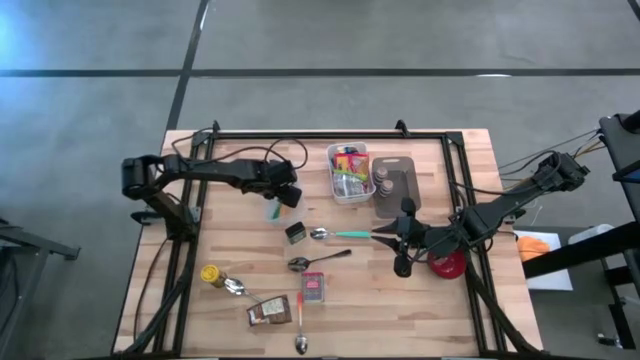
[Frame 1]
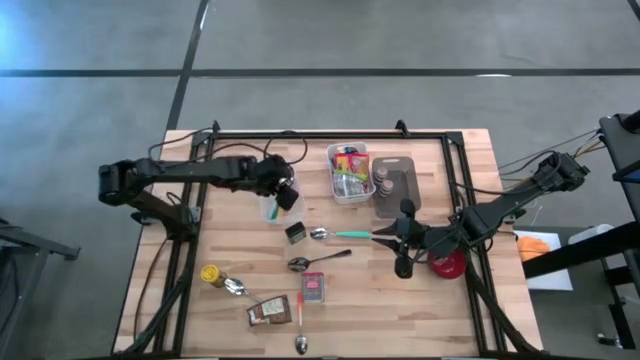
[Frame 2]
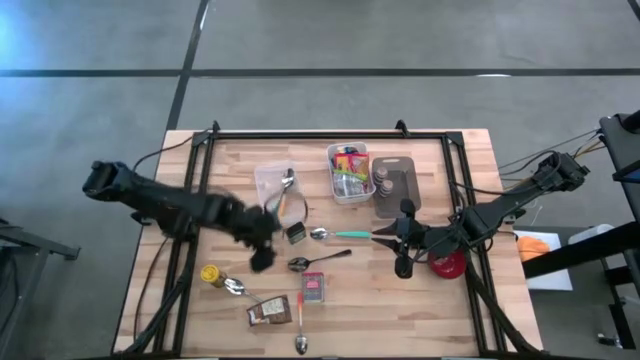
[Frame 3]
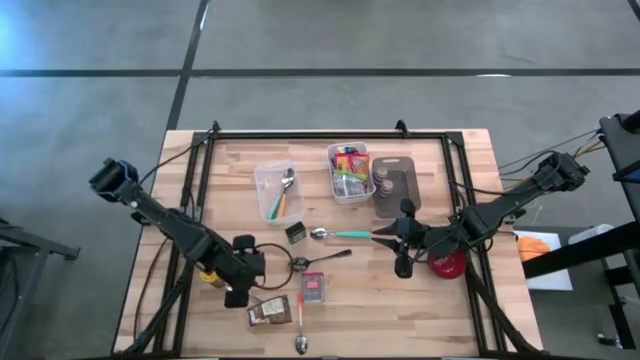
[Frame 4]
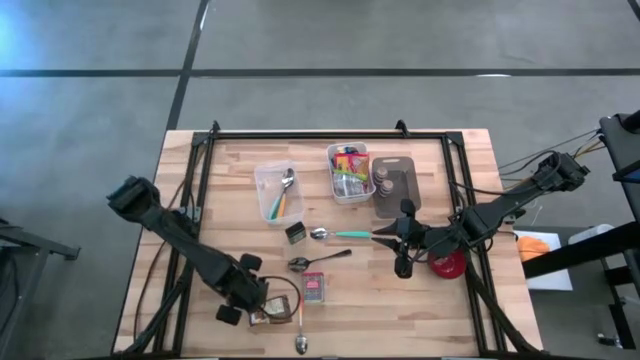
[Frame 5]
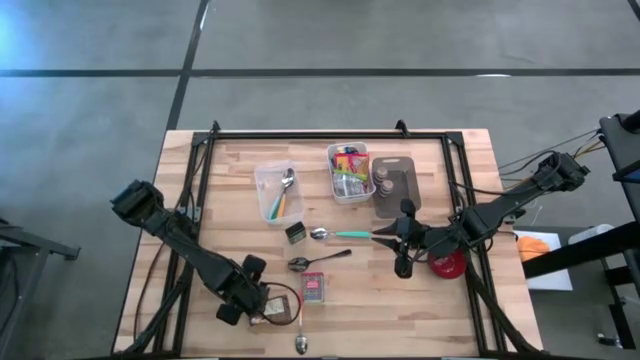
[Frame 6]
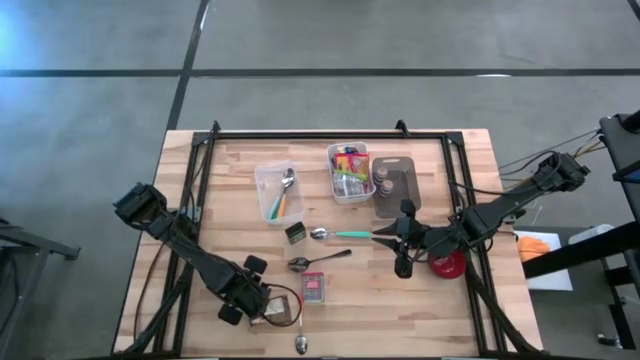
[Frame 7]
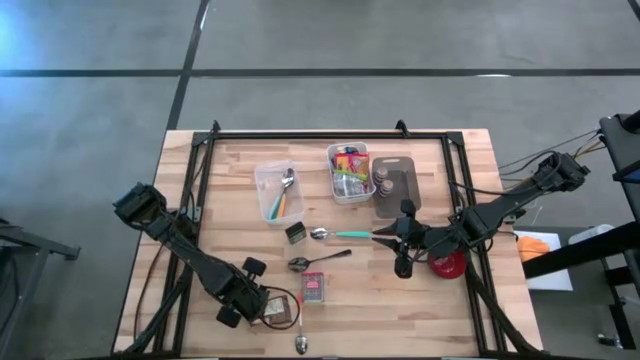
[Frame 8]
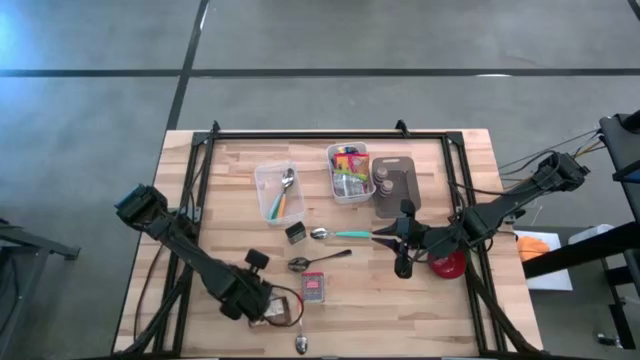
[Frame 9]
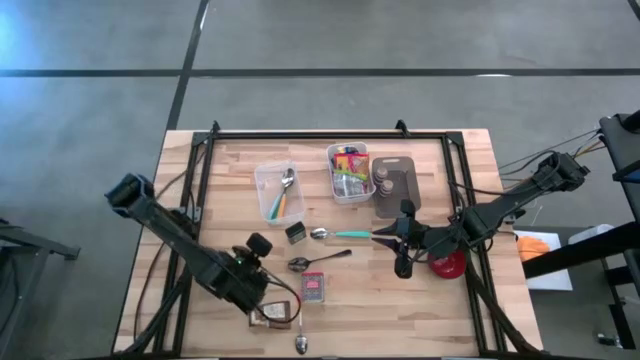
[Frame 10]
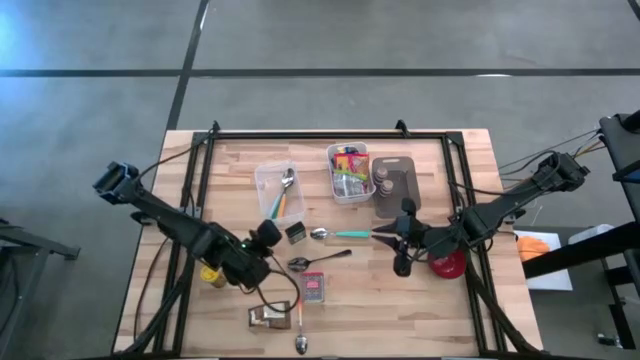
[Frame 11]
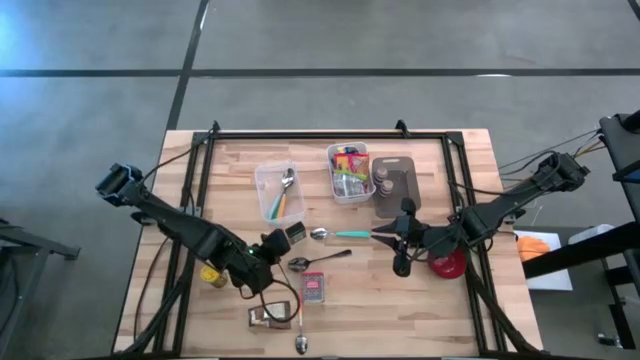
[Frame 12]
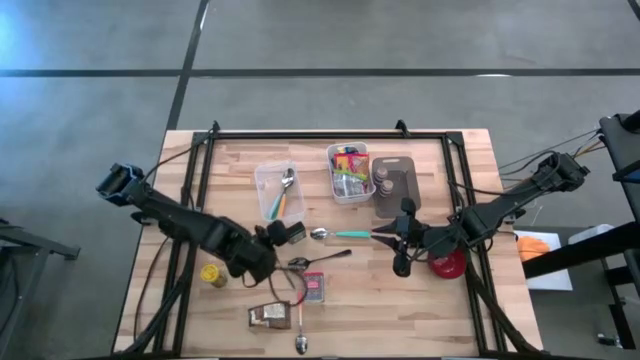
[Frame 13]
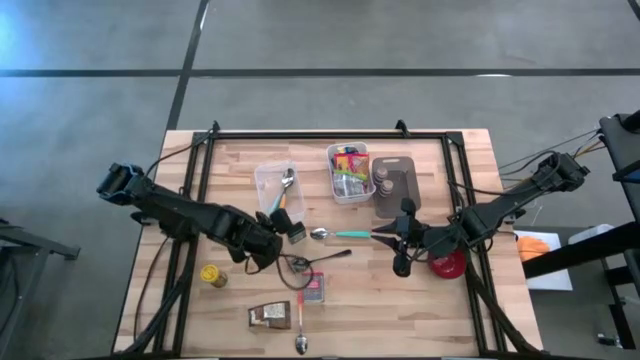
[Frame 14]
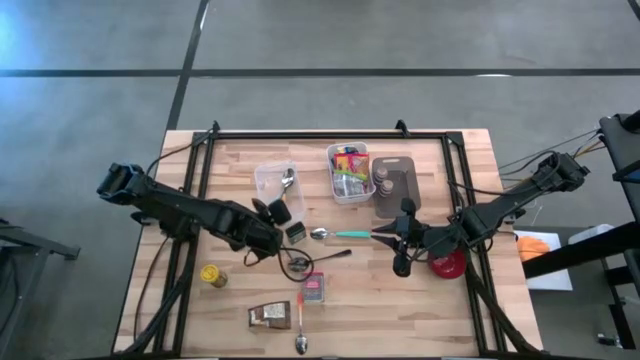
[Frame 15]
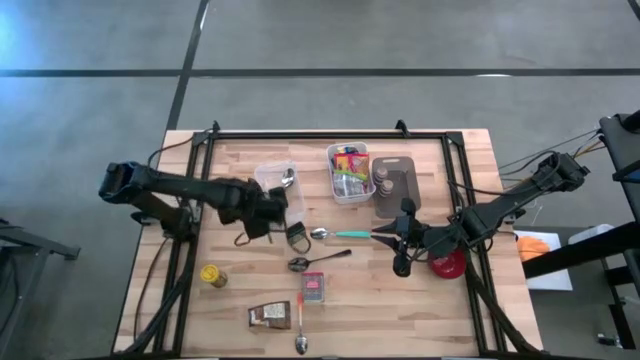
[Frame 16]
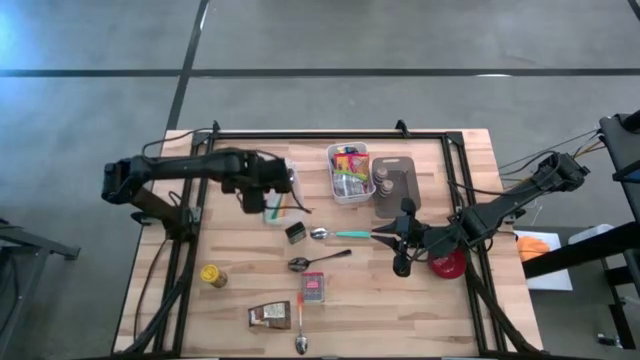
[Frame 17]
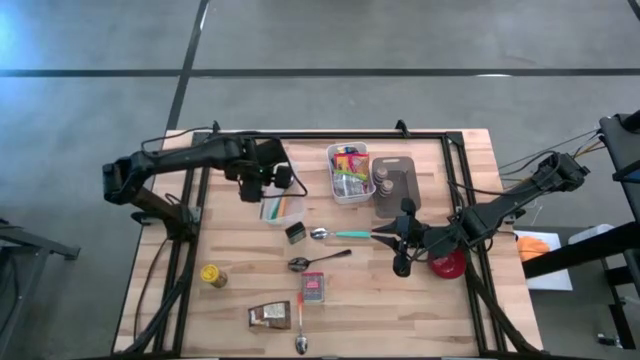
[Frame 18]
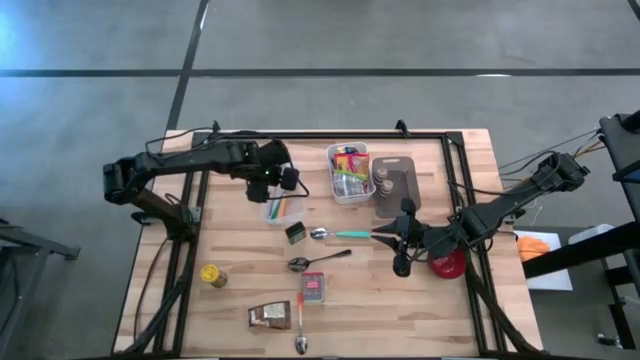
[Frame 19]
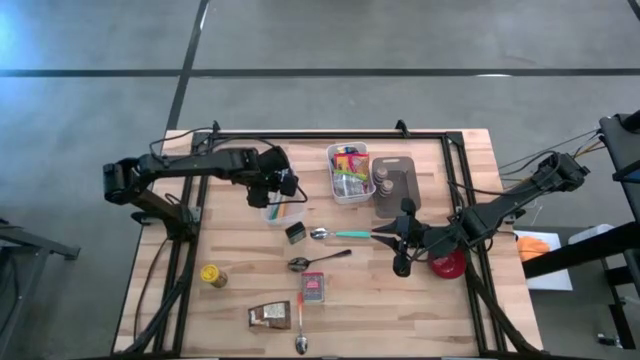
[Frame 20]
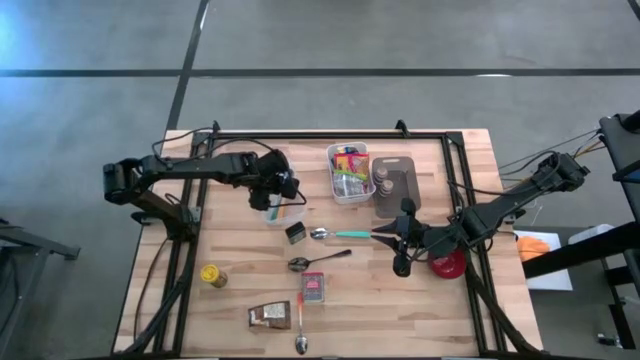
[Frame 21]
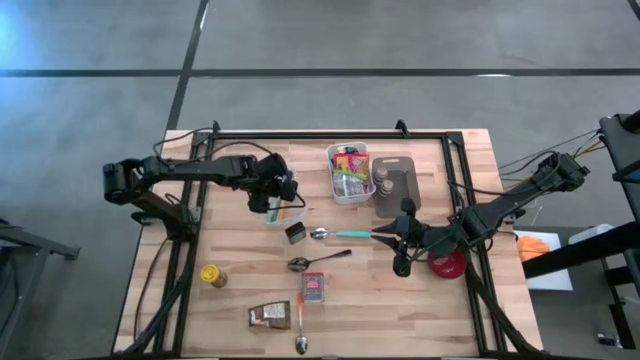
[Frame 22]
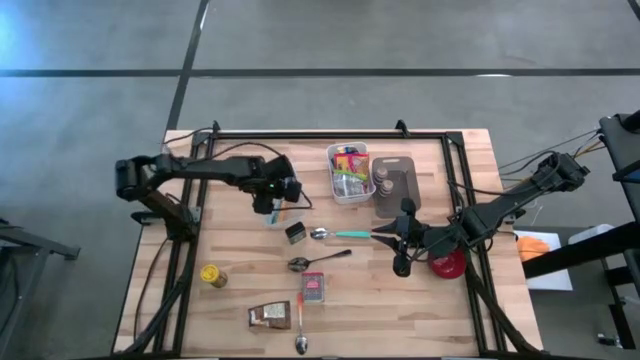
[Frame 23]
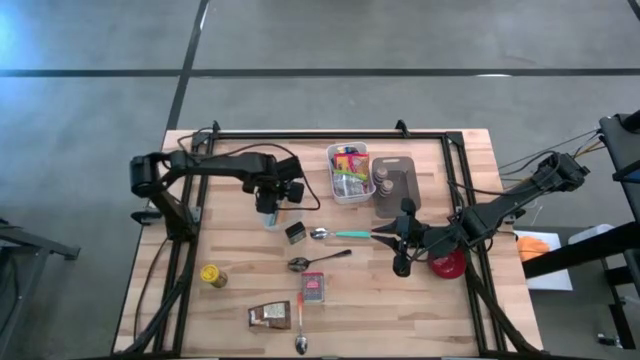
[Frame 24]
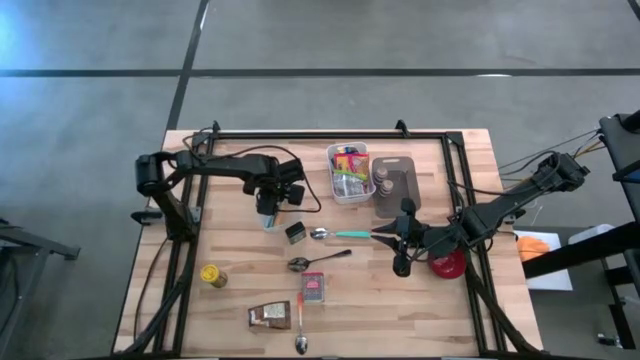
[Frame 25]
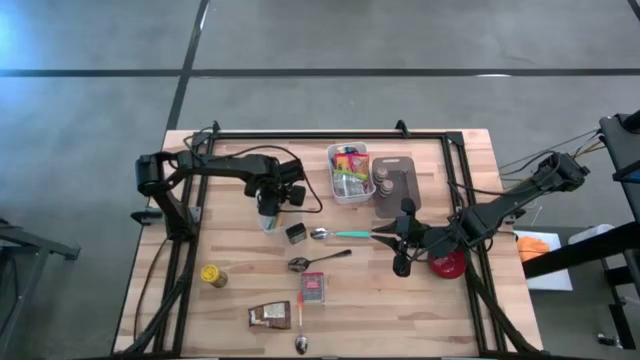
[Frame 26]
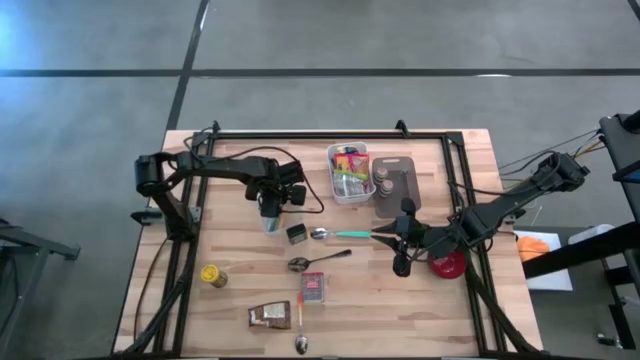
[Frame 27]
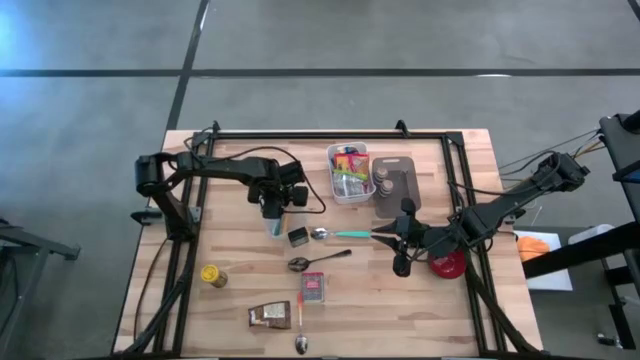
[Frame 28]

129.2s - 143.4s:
Put the silver spoon into the transparent bin

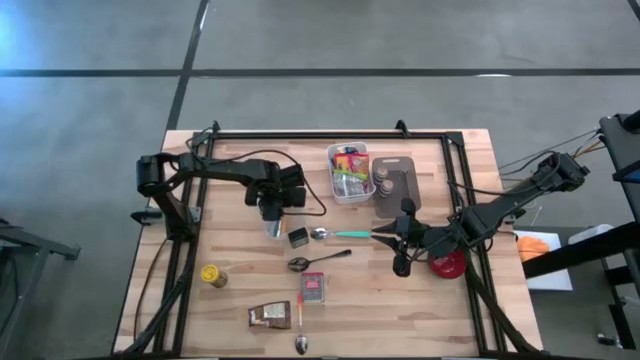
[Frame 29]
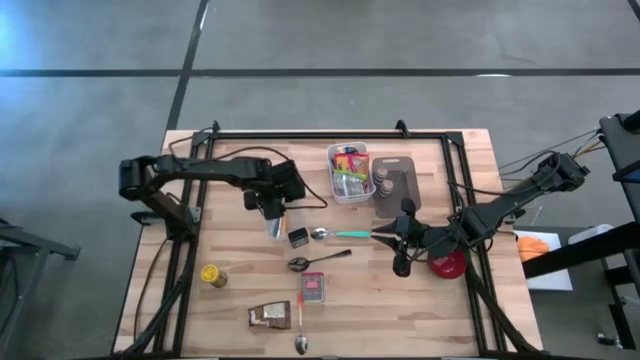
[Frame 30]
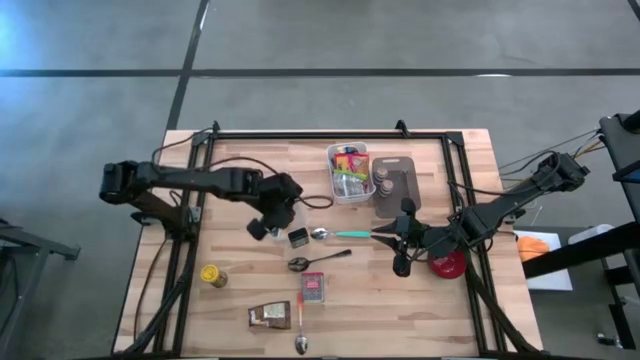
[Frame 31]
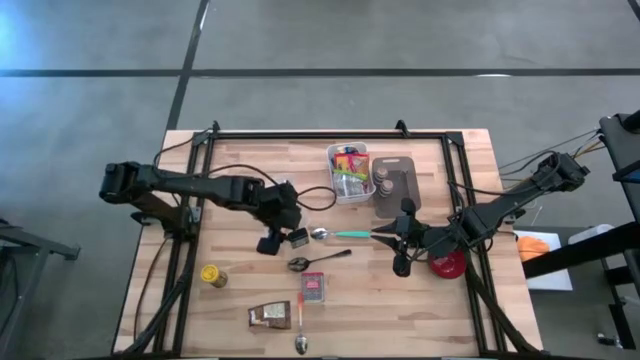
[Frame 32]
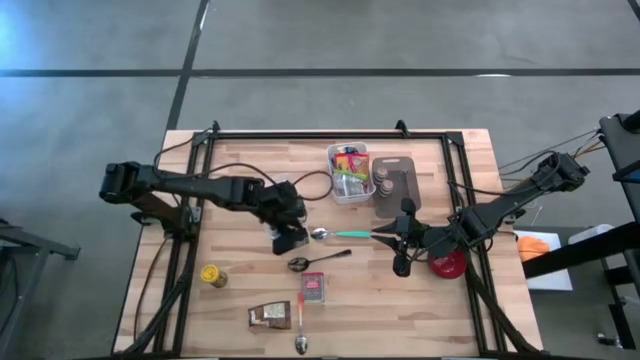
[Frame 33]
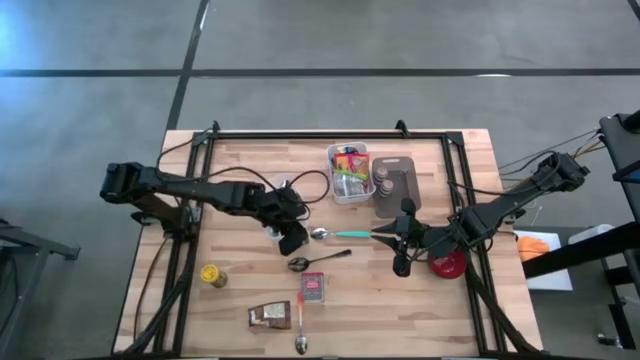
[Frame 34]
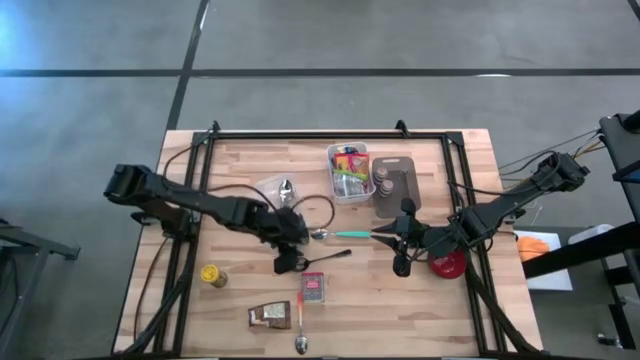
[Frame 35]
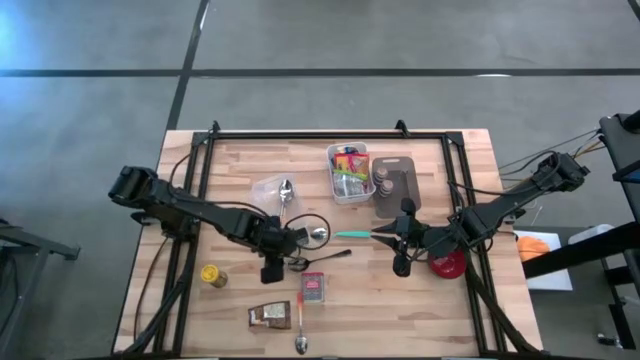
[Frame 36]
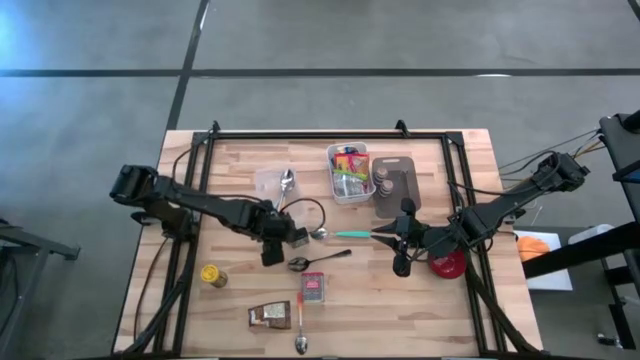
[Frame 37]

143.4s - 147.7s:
Adjust the transparent bin on the table

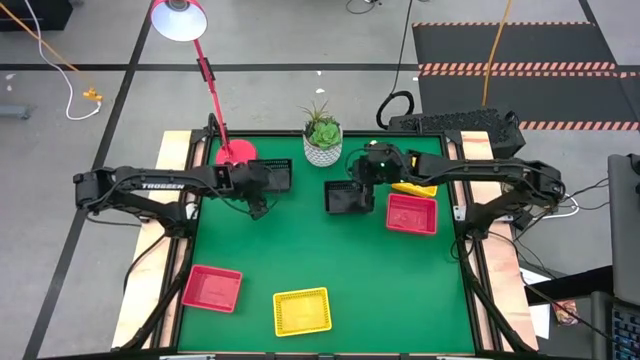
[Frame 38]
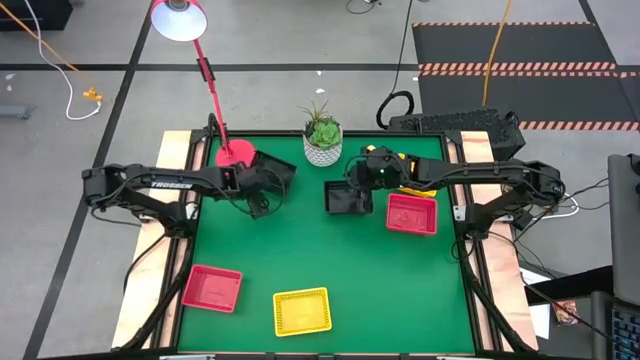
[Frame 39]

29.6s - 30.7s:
Stack the black bin on top of the stacked black bins
